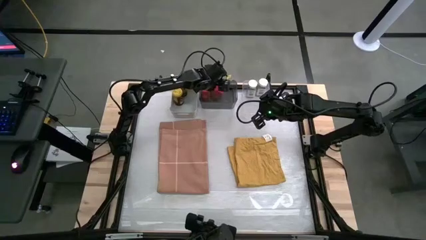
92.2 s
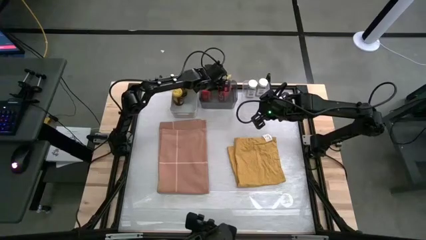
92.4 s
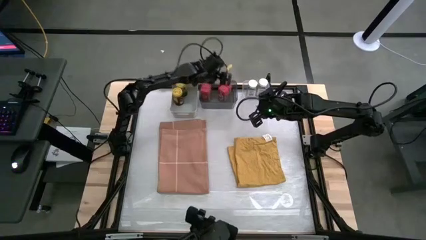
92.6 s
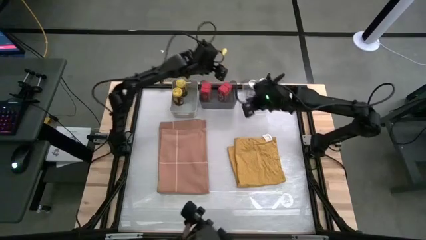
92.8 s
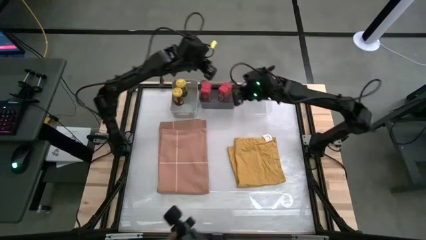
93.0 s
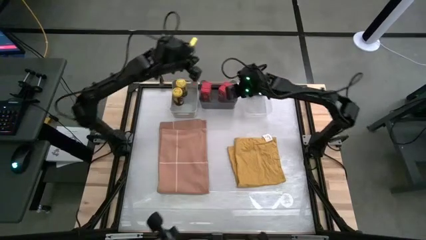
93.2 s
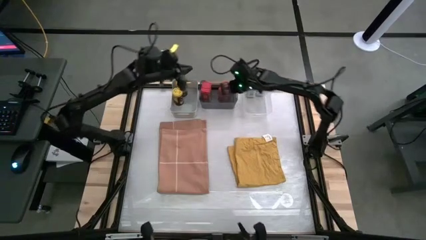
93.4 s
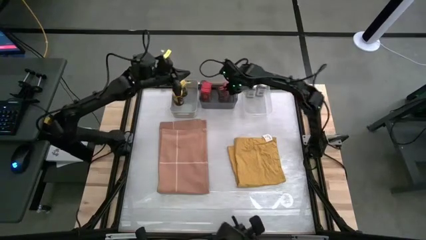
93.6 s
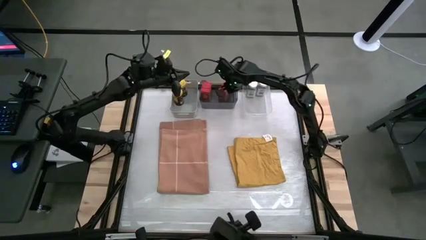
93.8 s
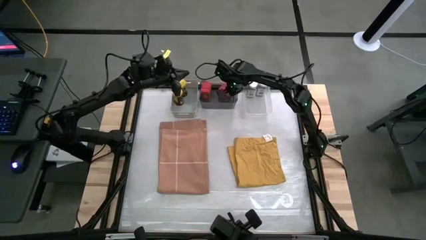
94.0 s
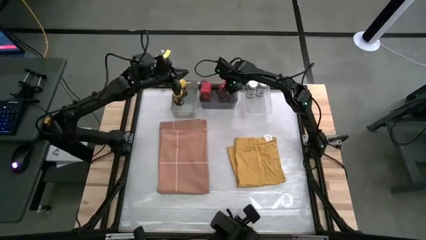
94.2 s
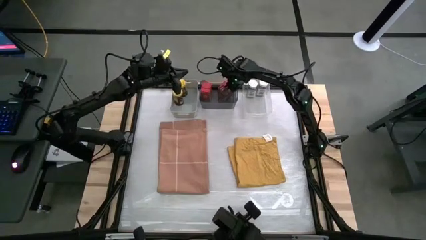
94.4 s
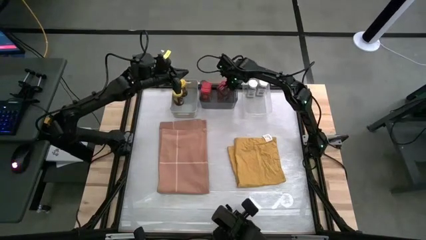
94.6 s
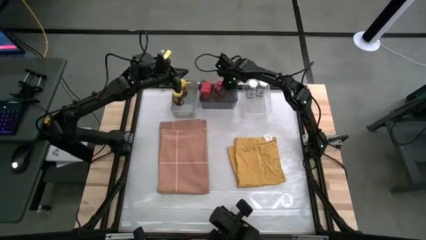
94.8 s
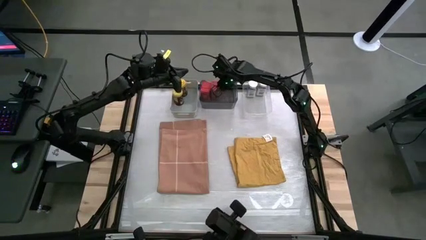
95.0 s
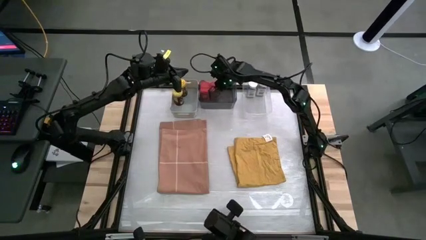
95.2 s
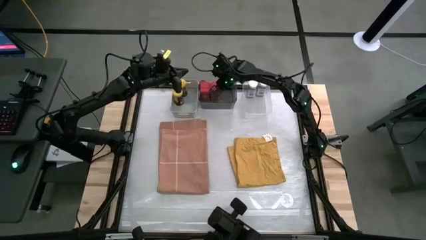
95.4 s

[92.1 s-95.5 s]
Task: Sort spices by type
Adjust the red seasoning can in the black transparent bin

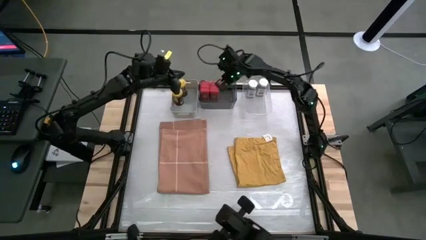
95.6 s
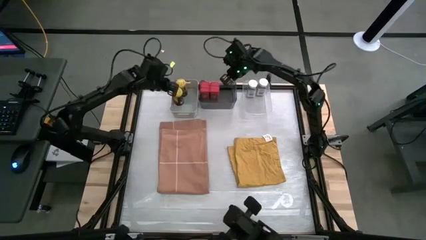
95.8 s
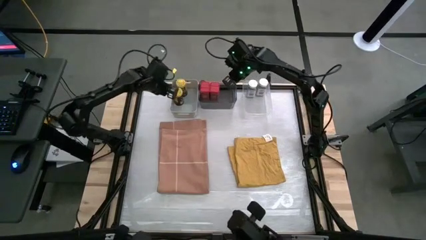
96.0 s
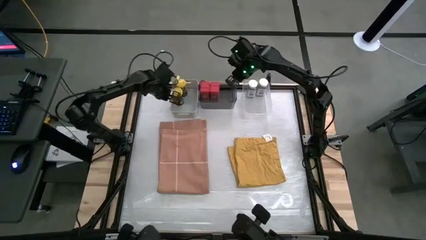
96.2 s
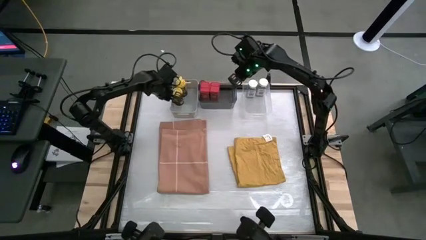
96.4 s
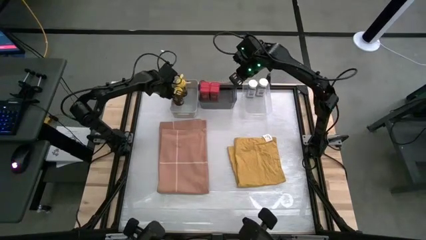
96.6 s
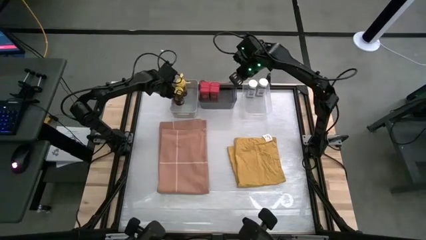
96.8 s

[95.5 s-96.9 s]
Adjust the yellow seasoning bottle in the gray bin

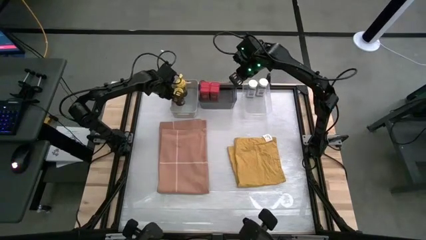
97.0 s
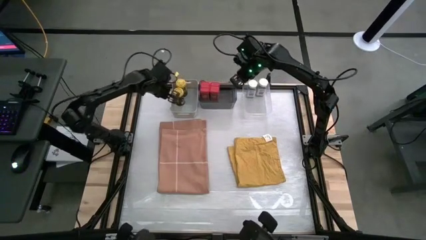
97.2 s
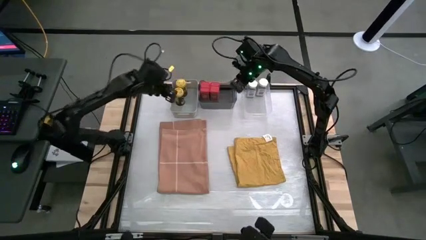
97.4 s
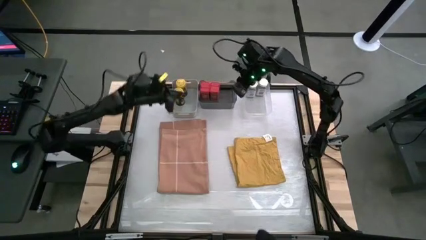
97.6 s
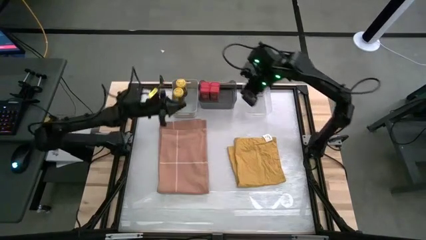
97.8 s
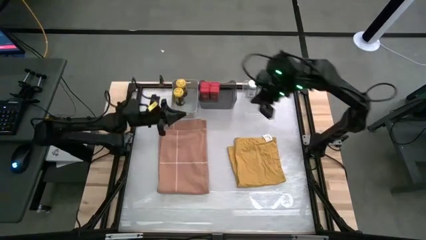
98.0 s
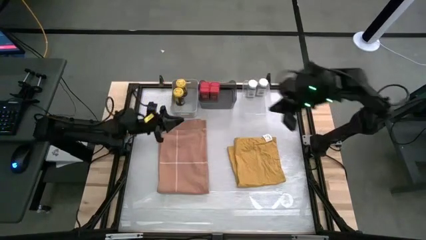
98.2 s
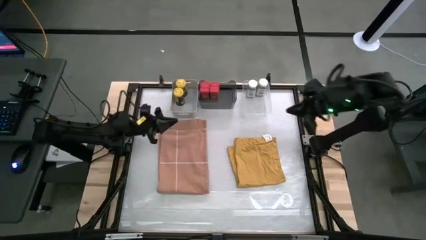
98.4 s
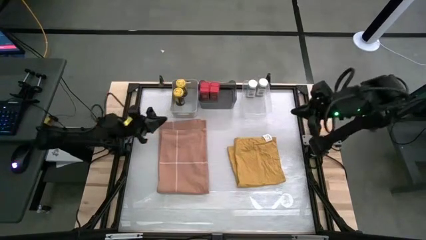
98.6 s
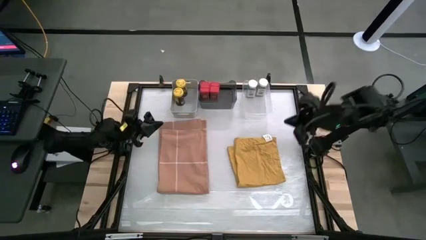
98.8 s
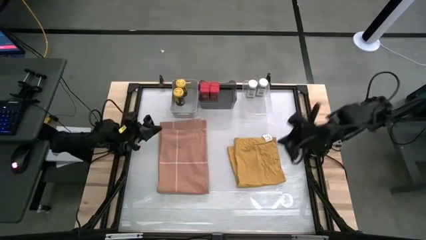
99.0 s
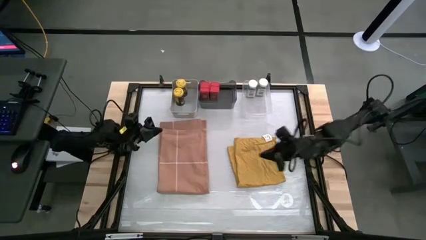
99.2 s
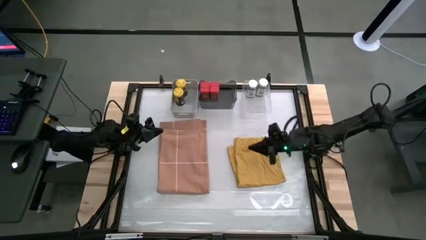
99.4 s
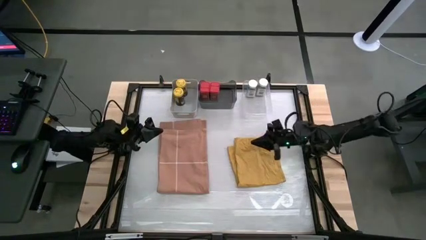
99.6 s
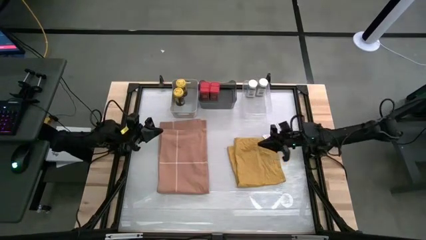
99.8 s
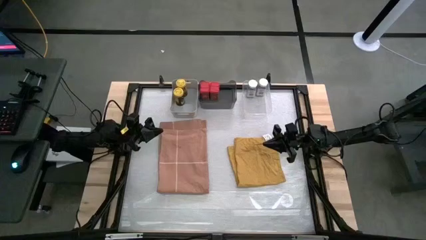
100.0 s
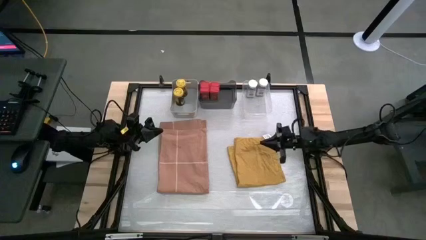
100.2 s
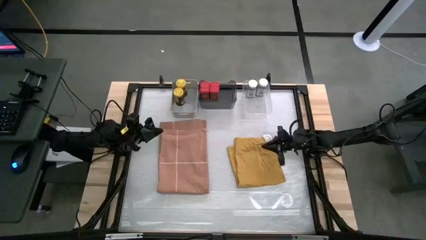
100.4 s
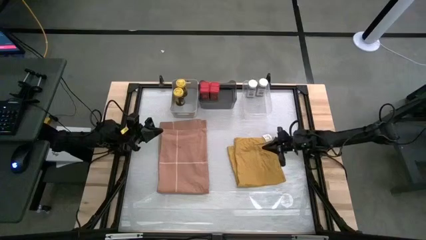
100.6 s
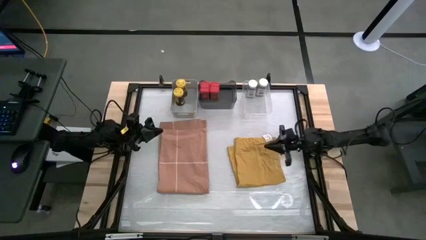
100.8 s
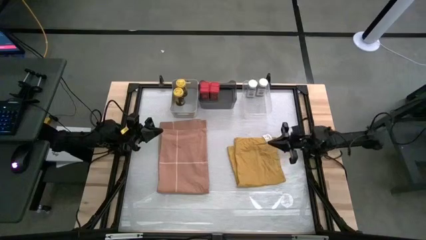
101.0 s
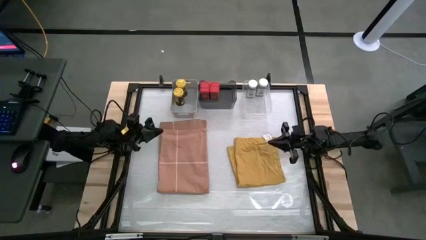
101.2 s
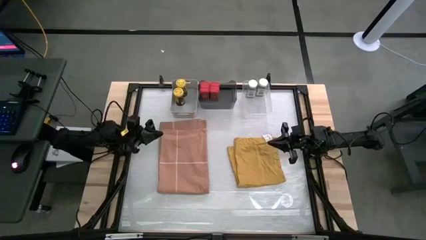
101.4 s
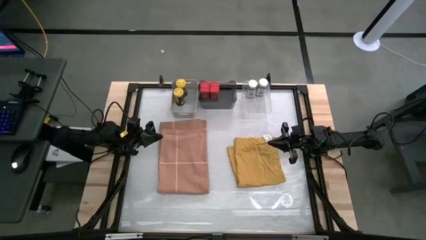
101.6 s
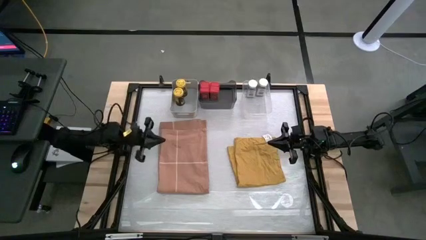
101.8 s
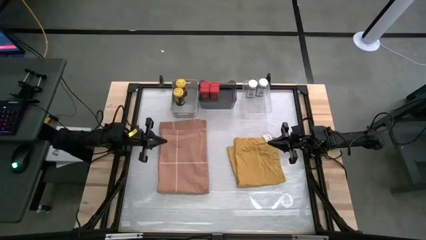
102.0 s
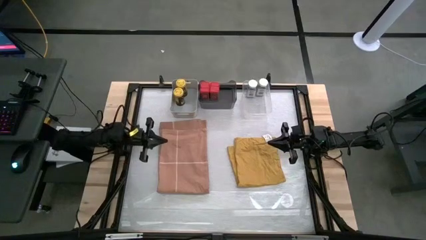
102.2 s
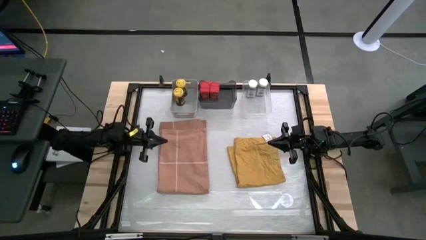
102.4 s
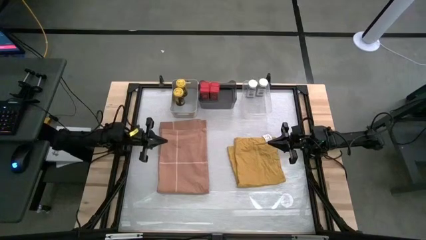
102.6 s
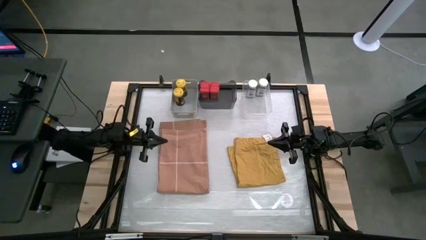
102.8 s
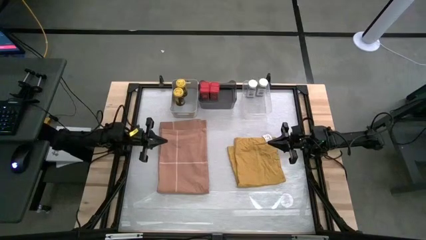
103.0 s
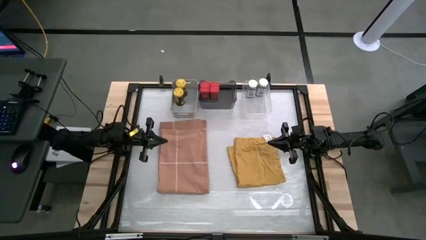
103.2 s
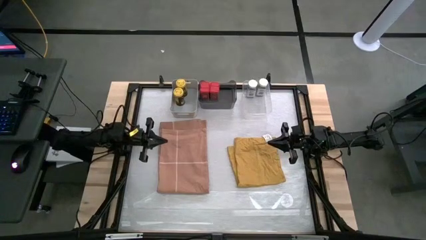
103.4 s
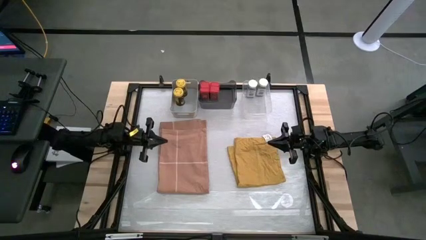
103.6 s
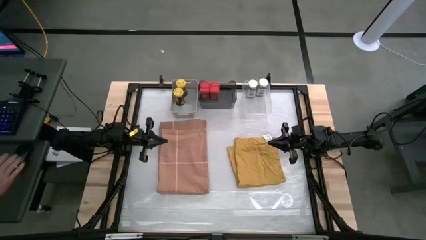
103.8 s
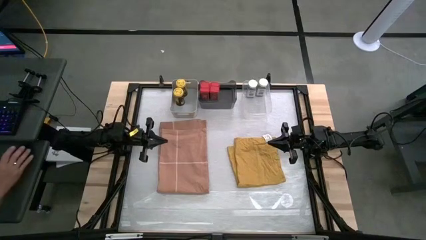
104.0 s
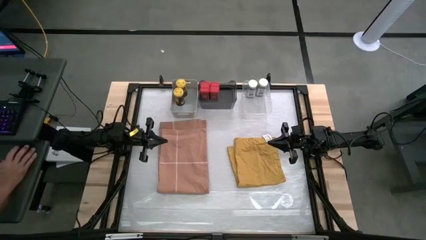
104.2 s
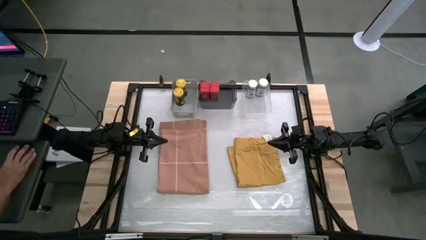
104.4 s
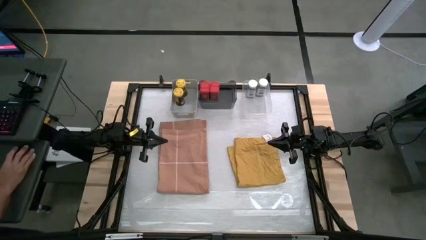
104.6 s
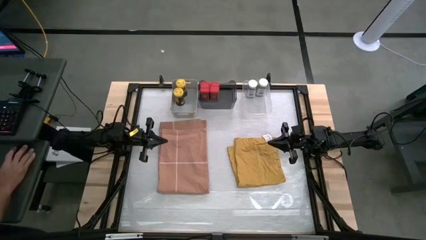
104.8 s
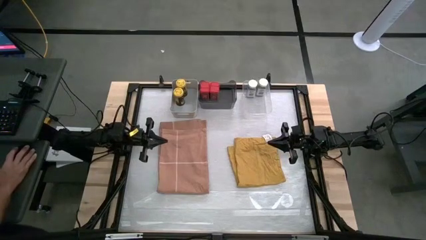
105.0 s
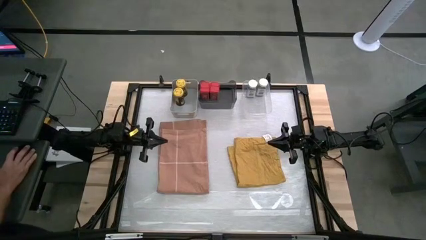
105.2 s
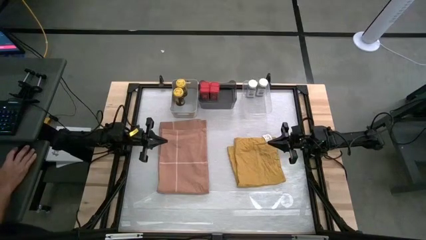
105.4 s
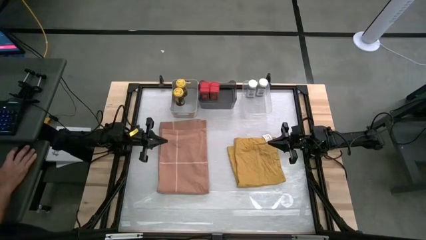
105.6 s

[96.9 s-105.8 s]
Return to Home Position

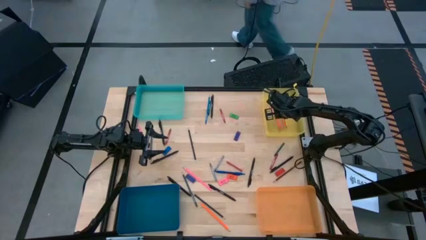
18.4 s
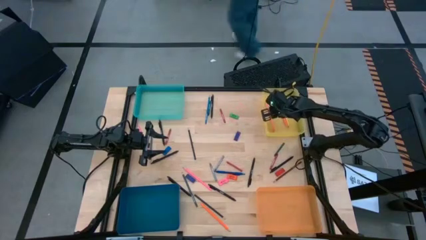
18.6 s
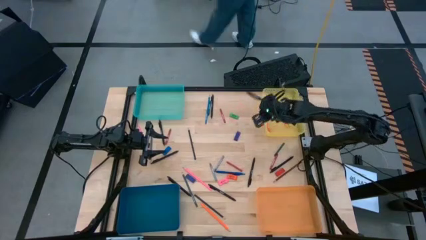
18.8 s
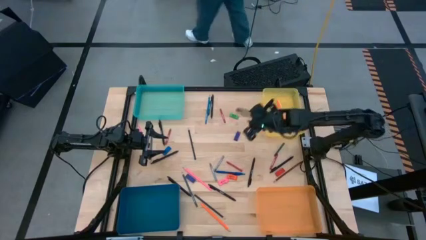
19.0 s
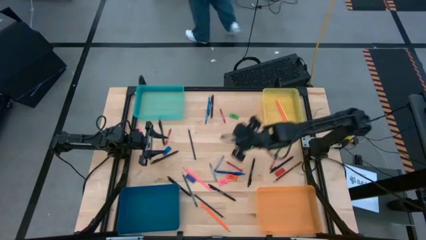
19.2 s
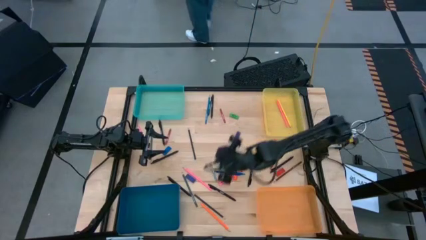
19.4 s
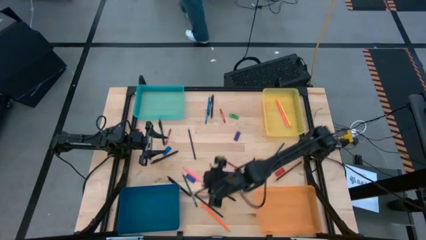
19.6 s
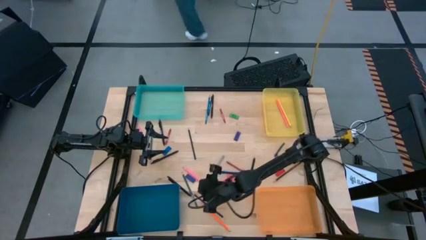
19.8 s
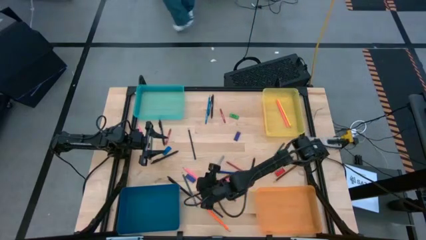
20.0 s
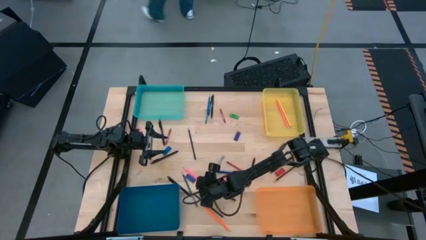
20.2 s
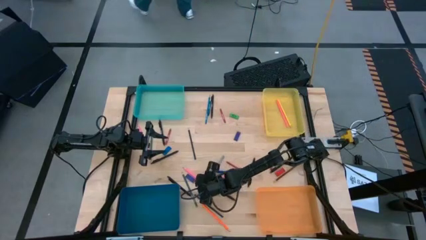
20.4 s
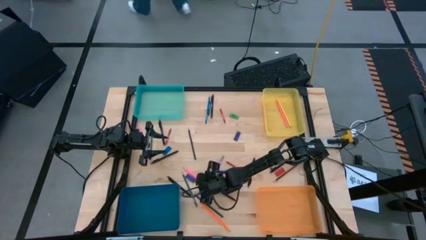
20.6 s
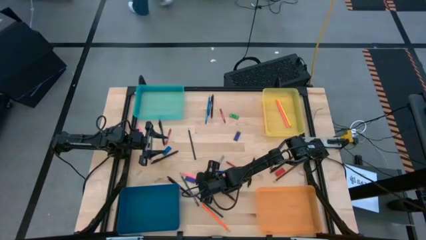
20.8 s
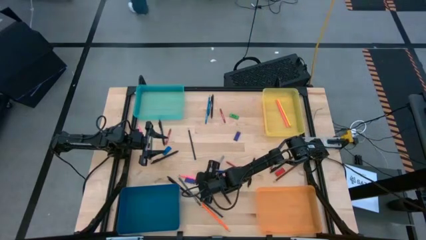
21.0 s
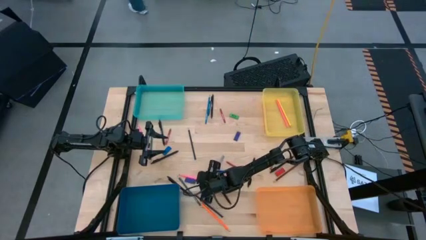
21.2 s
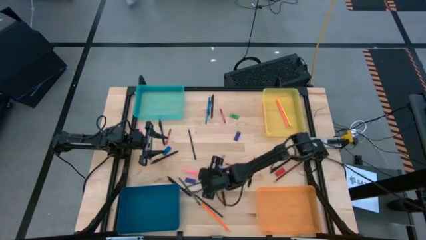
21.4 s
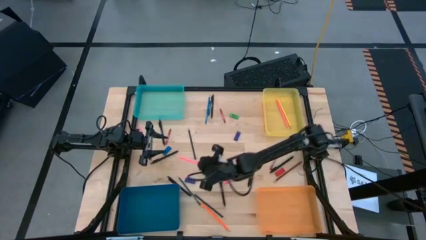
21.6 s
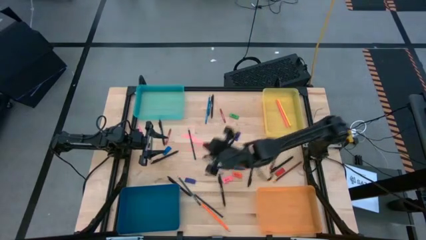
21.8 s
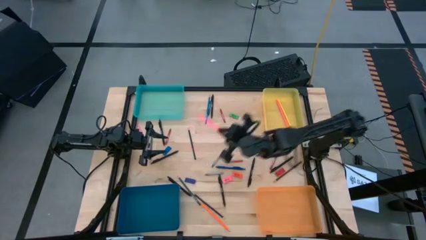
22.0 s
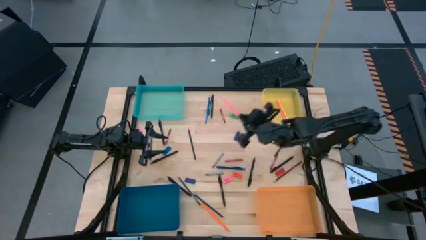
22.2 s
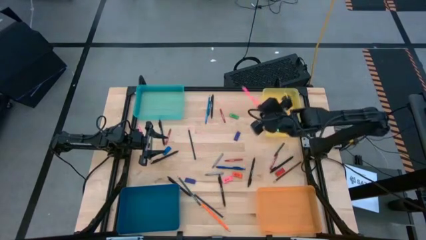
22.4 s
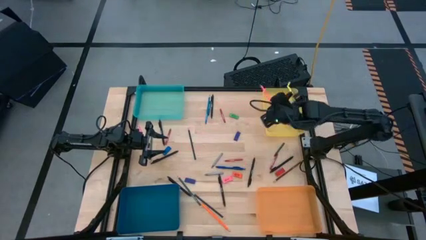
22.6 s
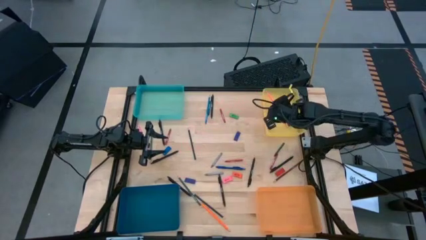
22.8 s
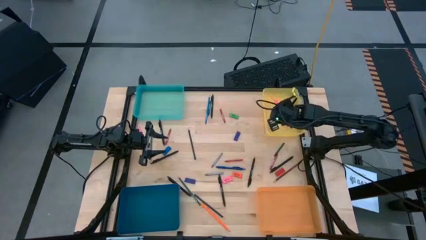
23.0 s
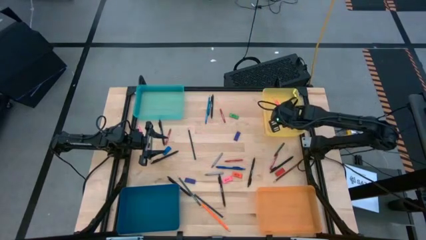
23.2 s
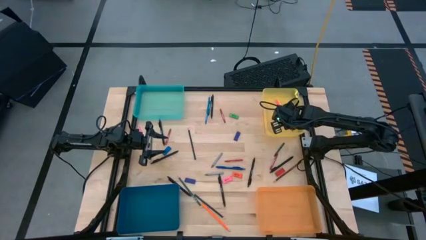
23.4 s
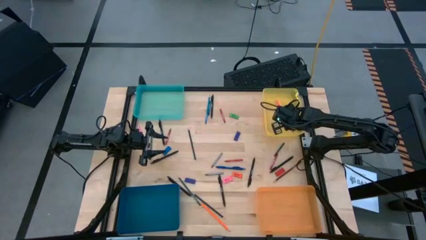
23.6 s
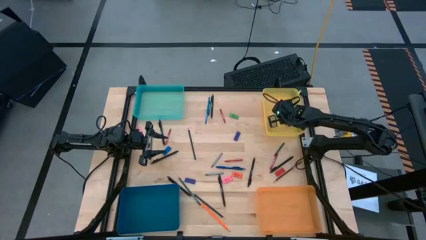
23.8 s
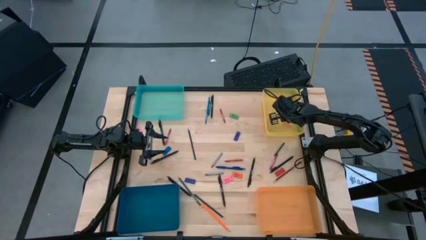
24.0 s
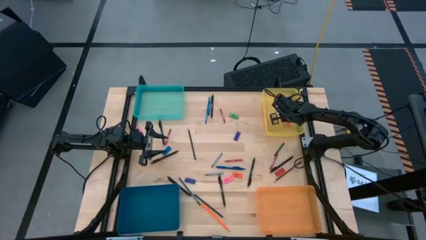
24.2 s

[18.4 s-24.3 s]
Task: Sort crayons/erasers/pens/pencils in bins
Put the pink pencil into the yellow bin
